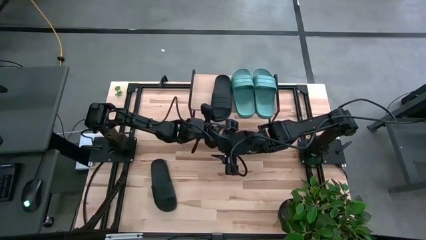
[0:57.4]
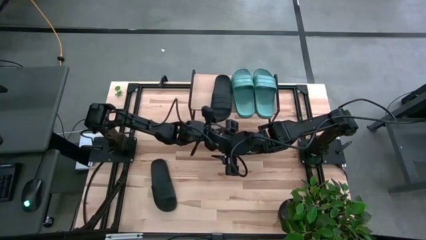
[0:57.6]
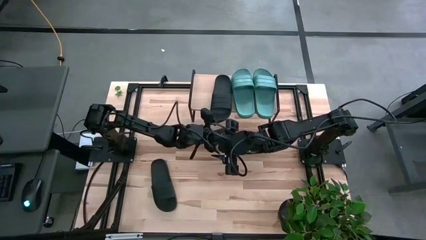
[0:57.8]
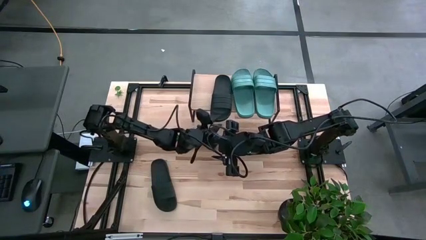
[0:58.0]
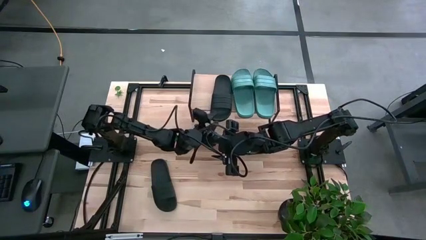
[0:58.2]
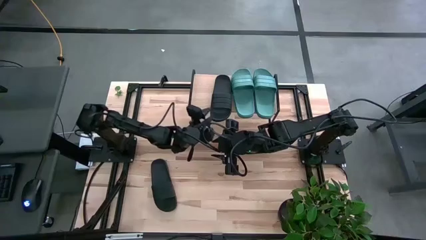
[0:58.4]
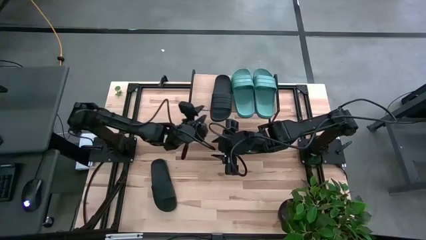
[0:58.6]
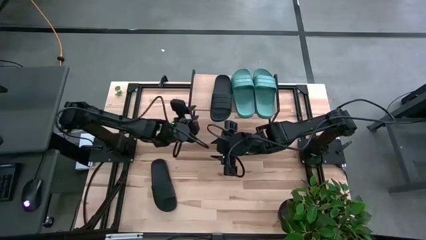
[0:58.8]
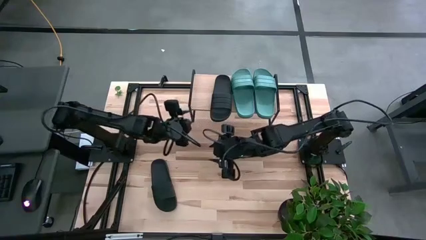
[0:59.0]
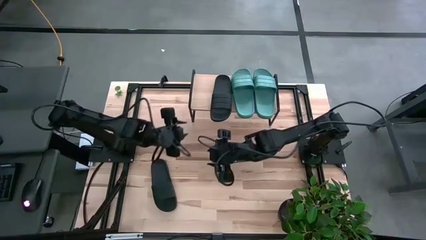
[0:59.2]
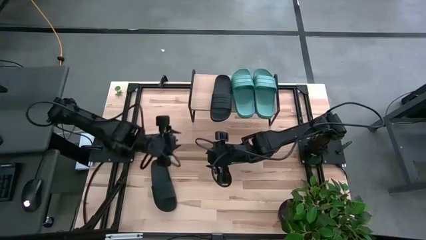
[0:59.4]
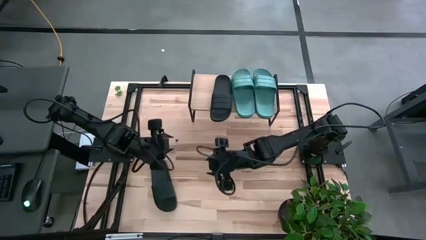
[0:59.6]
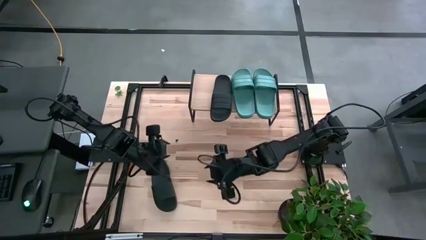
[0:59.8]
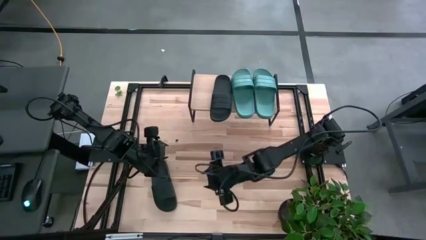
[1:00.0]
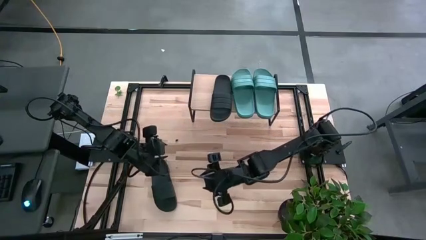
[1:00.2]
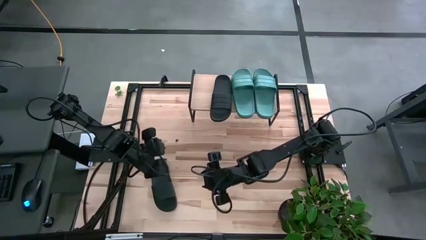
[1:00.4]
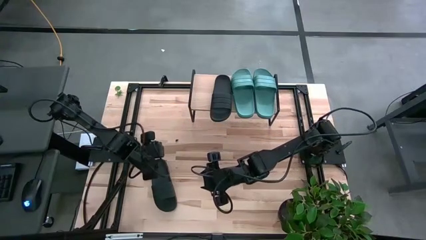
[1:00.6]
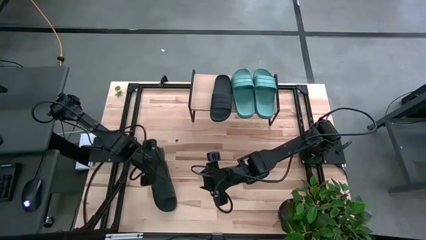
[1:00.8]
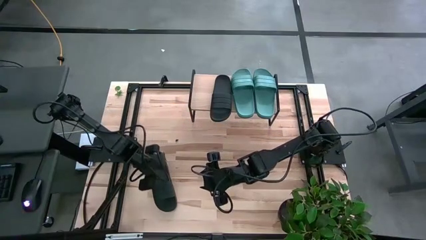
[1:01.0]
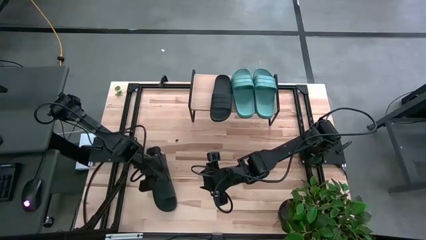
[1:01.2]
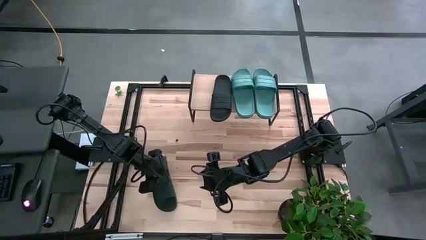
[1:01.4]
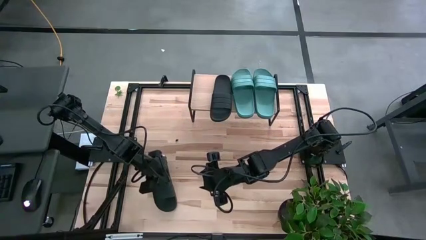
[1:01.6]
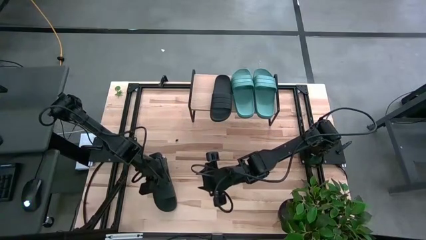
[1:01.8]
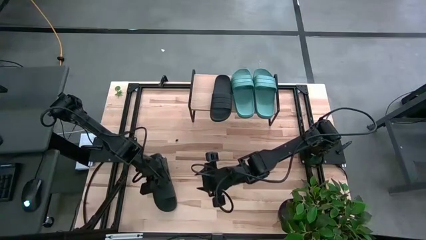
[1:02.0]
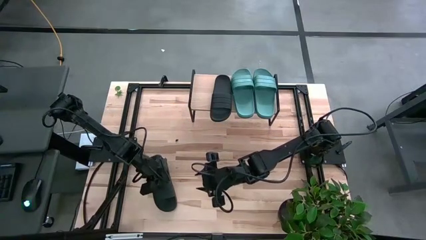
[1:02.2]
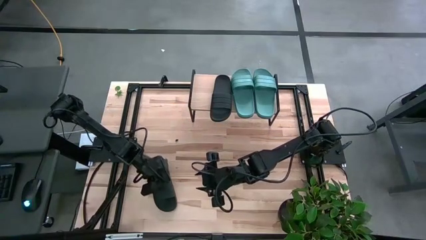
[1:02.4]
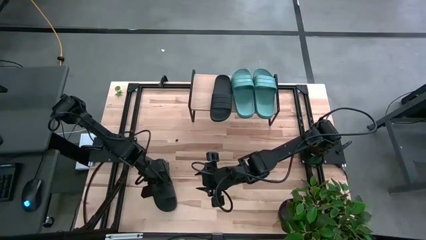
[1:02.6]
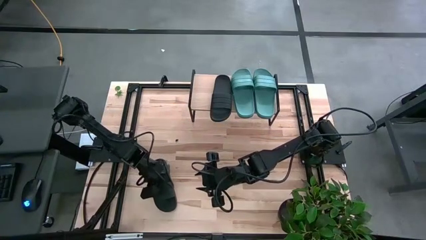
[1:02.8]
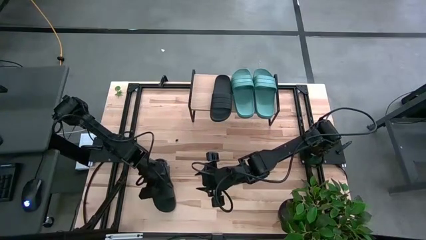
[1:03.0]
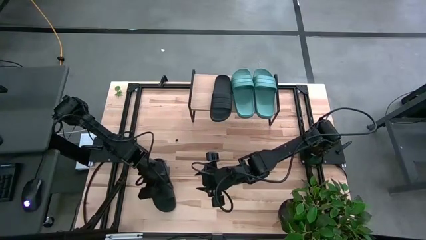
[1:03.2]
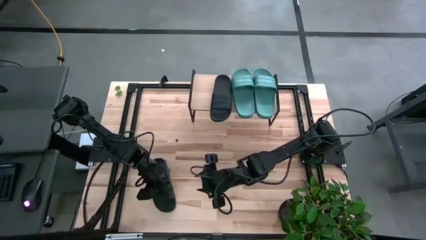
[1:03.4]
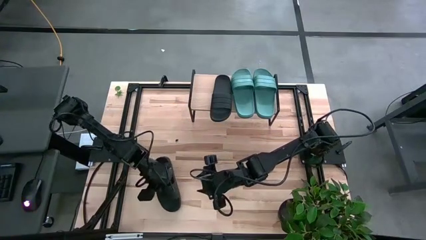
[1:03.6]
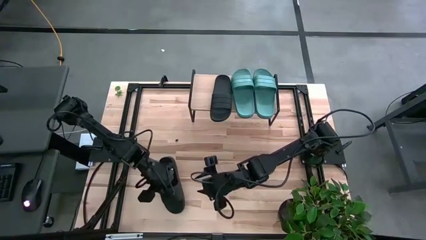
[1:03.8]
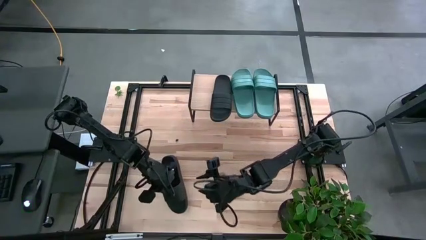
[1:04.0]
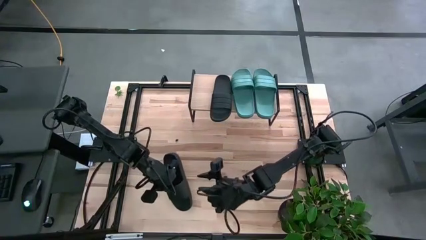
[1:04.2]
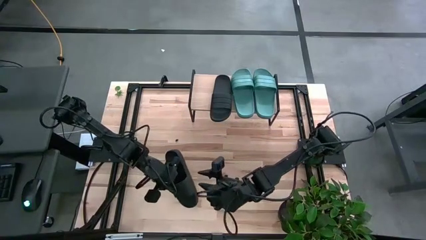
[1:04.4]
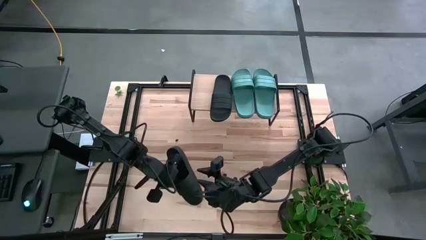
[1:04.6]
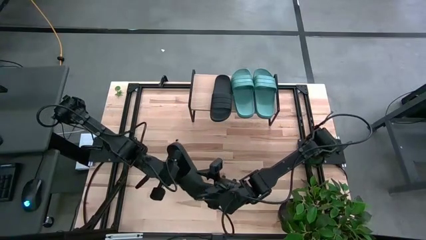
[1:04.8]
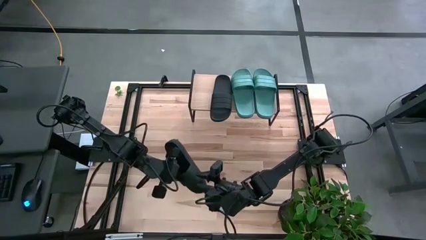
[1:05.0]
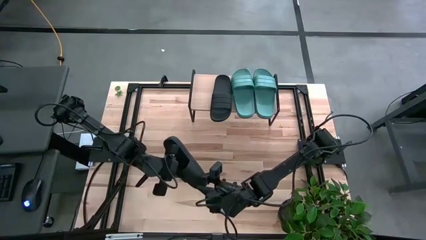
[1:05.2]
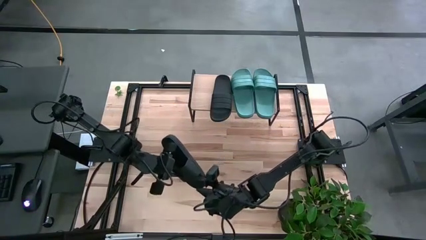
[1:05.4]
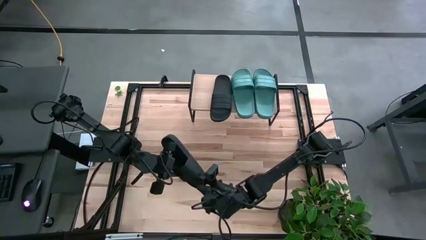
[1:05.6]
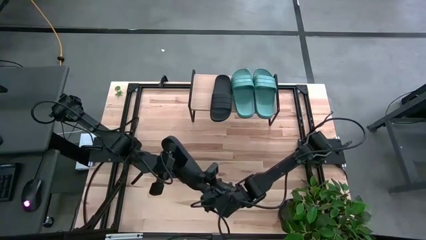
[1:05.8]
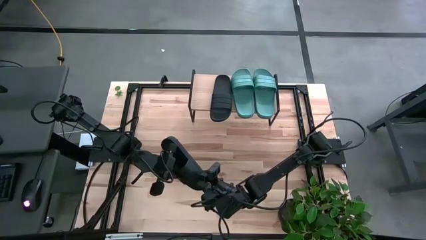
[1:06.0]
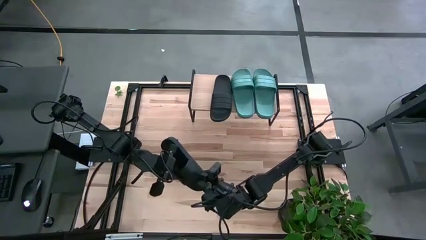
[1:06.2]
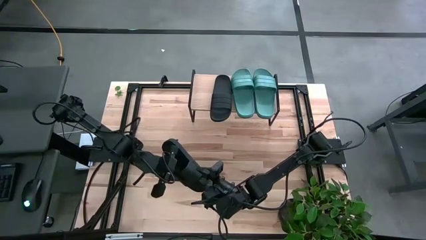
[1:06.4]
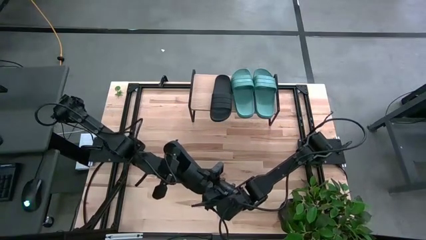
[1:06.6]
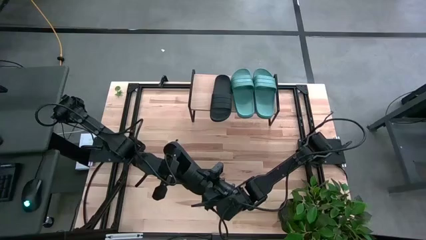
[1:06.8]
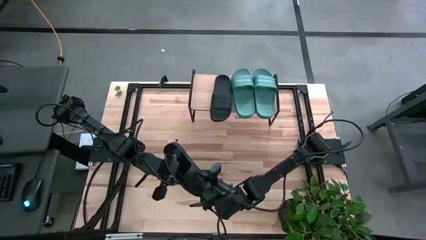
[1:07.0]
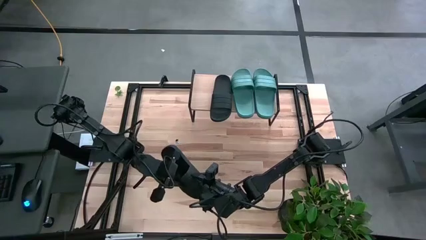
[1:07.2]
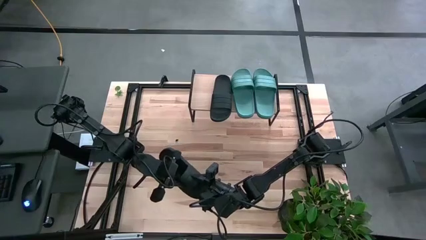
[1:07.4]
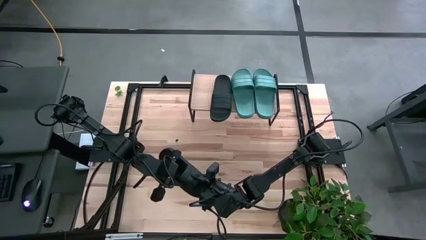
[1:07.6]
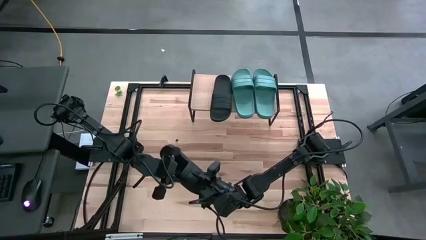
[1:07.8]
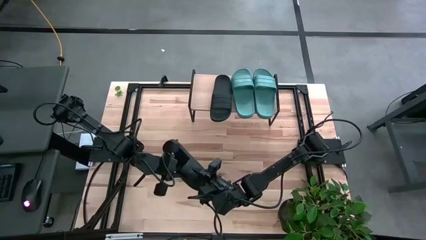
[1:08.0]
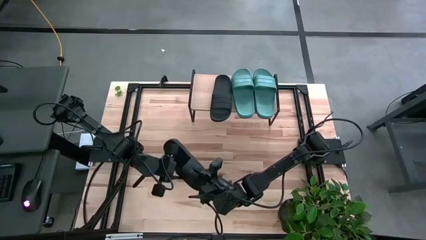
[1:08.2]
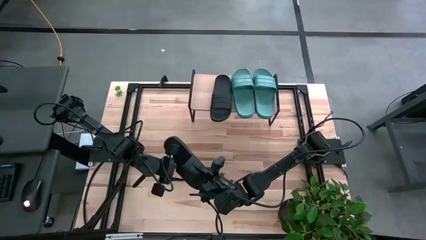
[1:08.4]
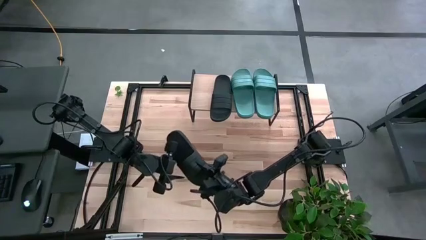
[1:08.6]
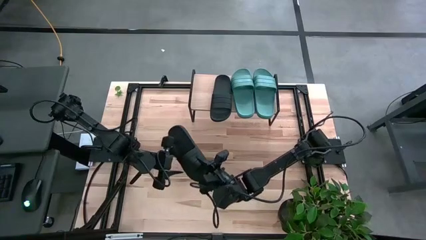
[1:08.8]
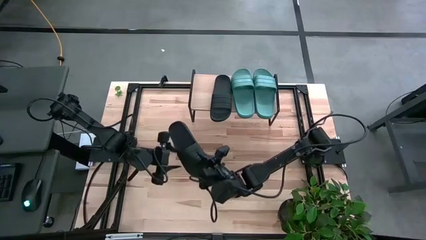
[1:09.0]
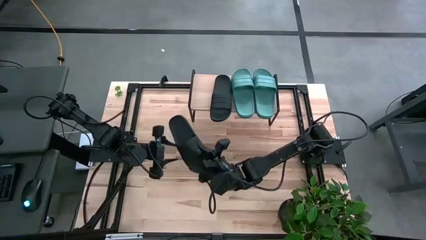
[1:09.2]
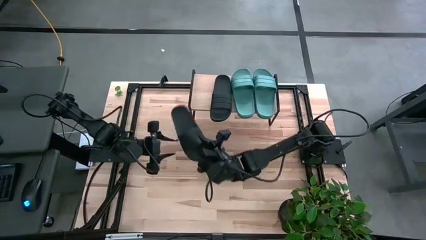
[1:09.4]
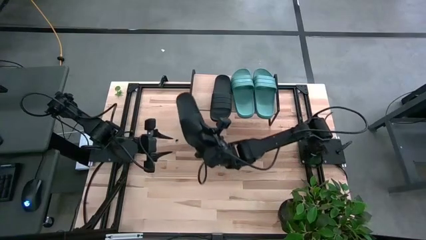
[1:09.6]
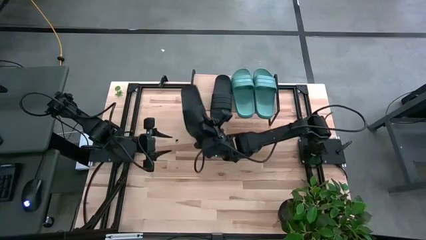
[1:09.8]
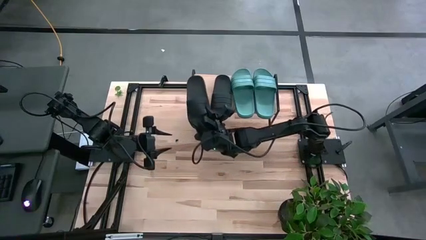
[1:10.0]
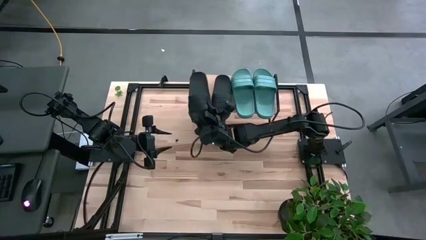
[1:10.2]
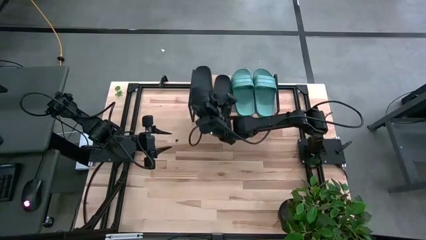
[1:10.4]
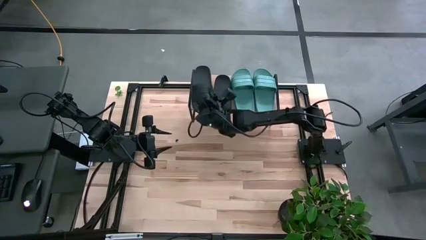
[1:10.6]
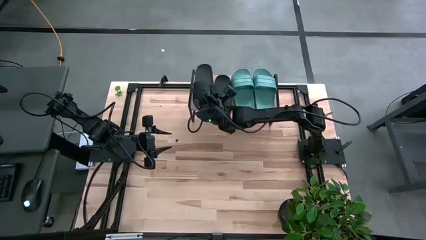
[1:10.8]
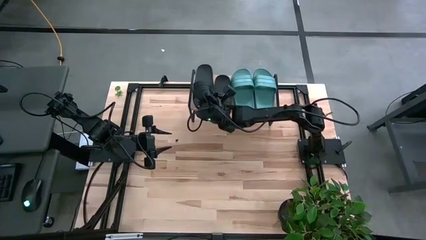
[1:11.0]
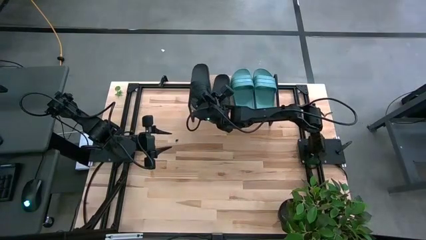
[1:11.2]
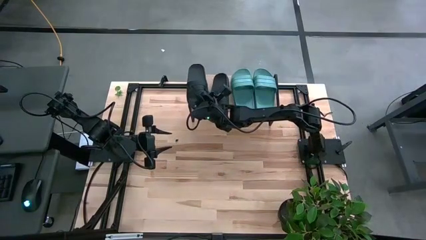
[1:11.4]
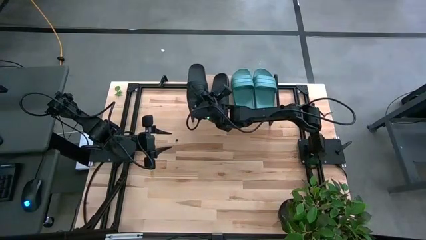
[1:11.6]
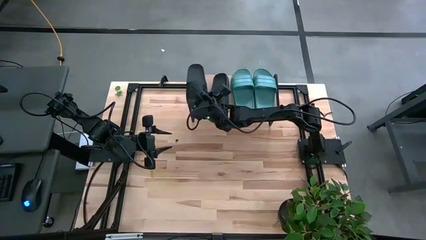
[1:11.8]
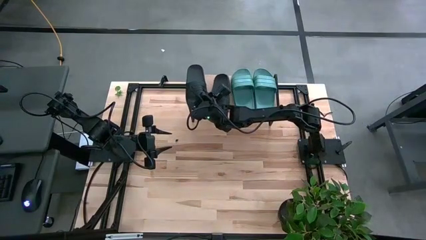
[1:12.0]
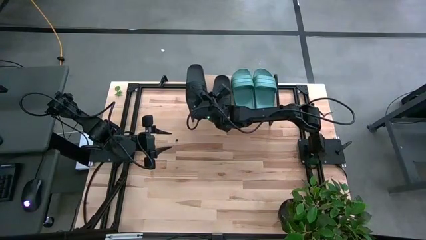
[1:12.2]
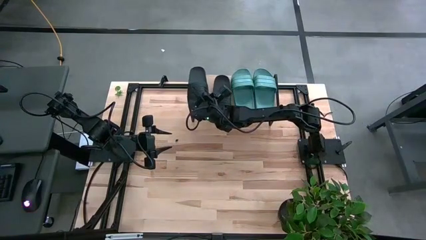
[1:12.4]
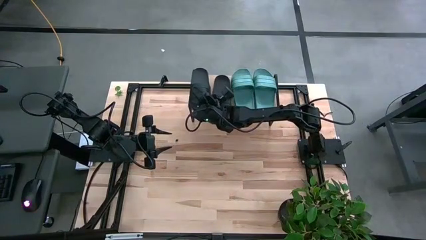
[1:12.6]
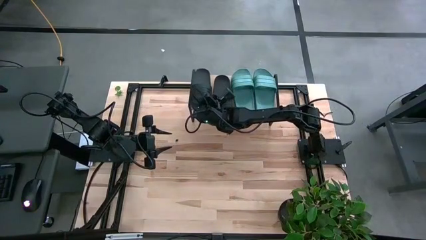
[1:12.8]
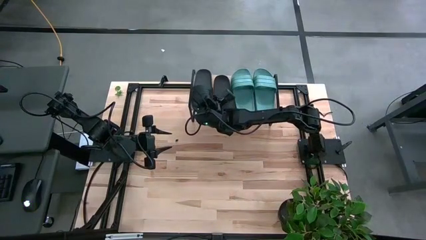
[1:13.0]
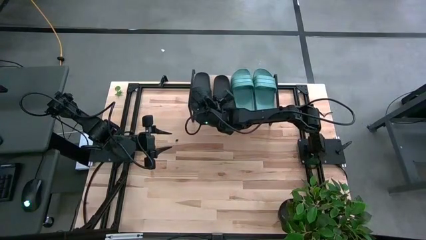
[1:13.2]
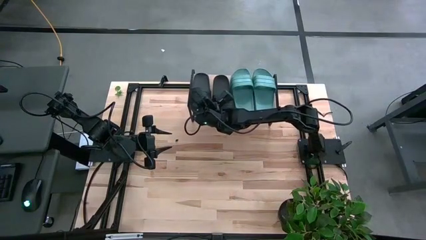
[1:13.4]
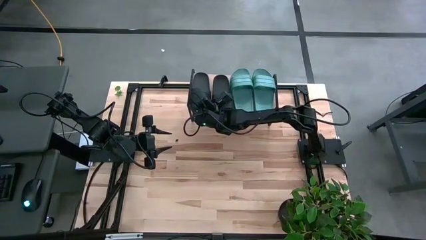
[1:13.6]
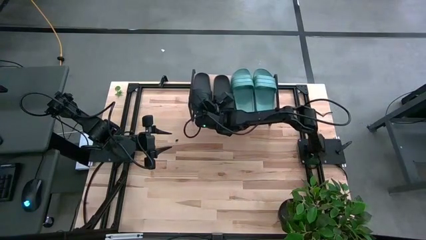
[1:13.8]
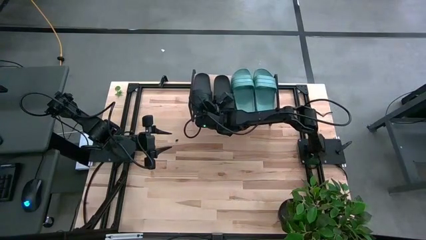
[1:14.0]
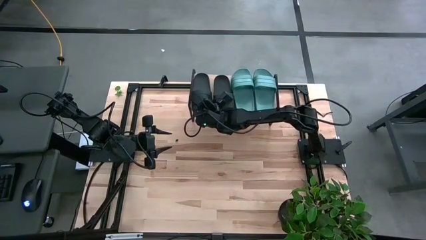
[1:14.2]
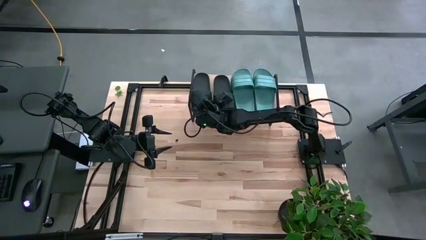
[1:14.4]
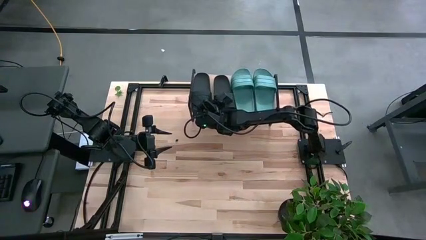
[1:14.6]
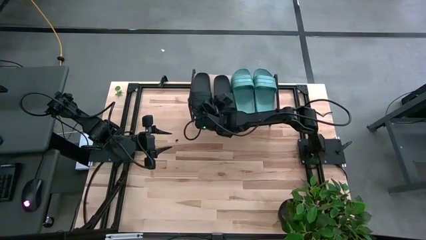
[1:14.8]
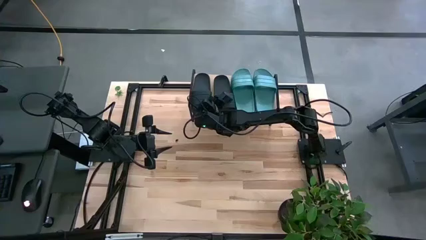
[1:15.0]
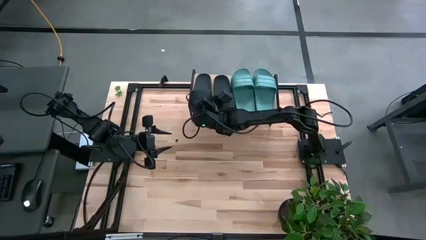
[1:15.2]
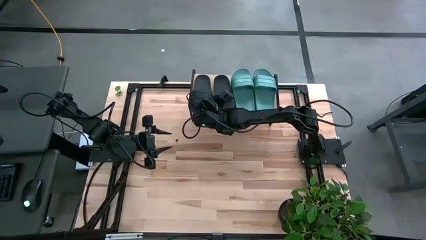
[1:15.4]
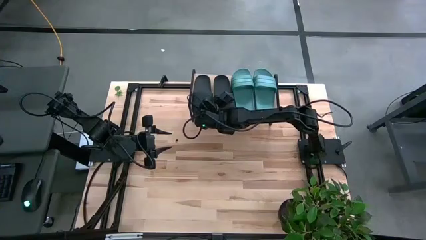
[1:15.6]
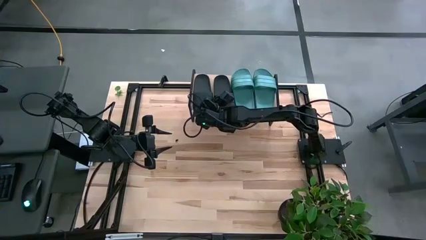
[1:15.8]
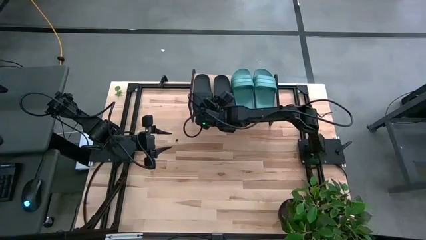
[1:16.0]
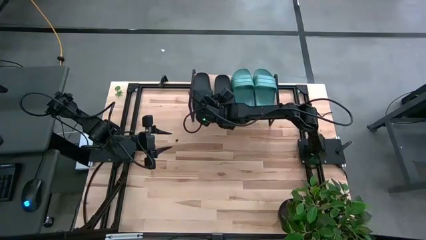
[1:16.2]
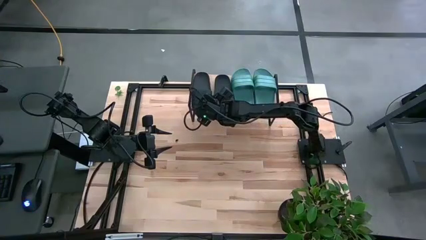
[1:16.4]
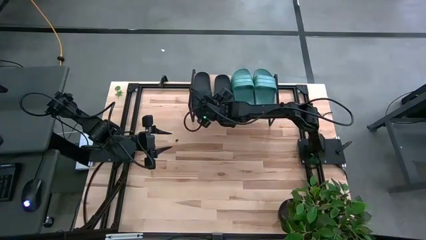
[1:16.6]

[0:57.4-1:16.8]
Task: Pick and place slides into the shelf
Put the black slide on the shelf
